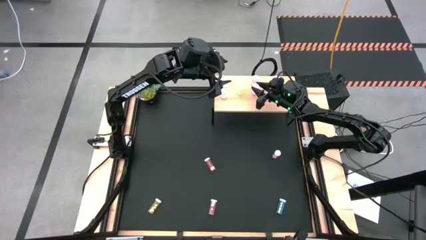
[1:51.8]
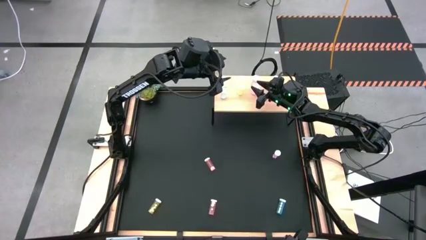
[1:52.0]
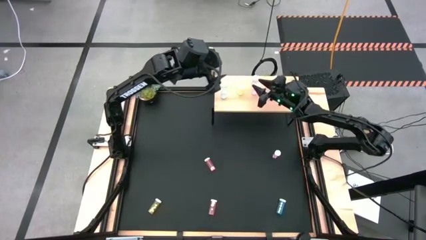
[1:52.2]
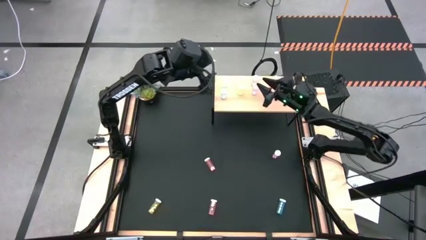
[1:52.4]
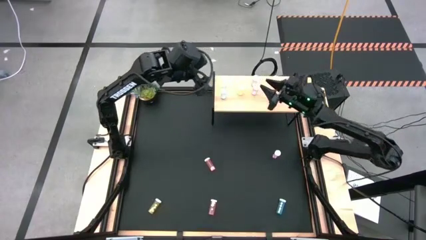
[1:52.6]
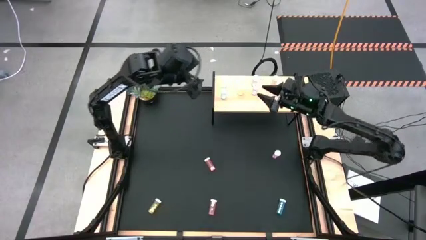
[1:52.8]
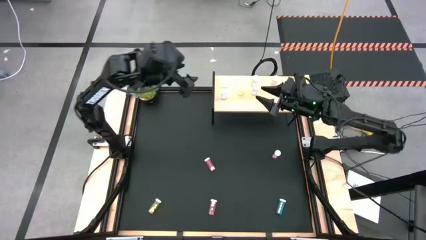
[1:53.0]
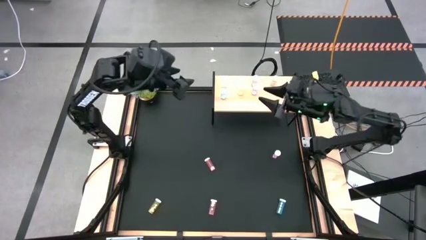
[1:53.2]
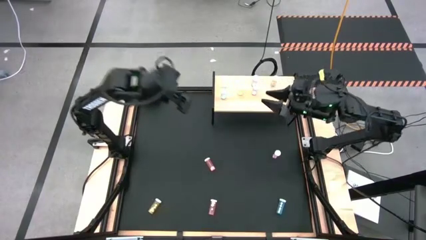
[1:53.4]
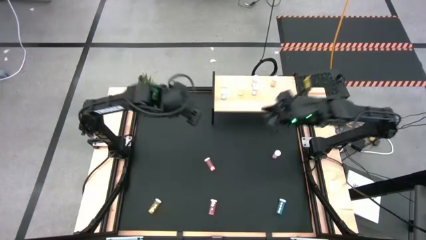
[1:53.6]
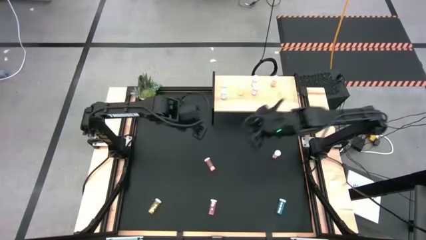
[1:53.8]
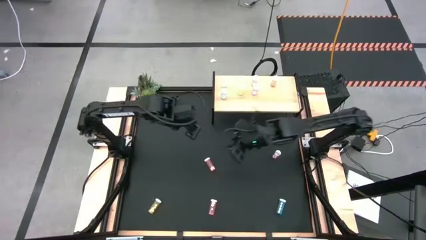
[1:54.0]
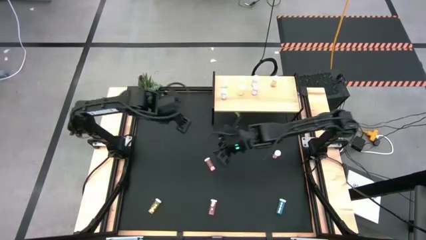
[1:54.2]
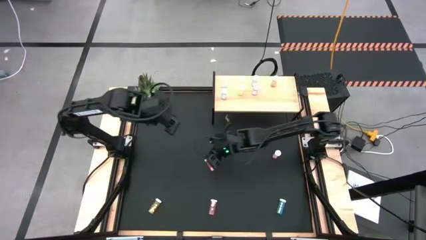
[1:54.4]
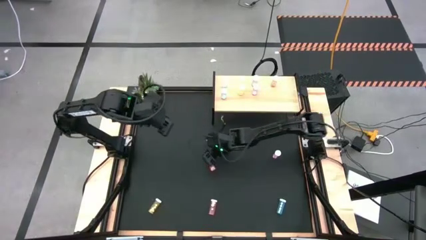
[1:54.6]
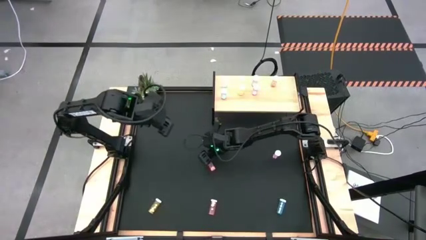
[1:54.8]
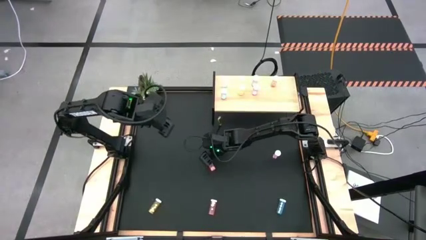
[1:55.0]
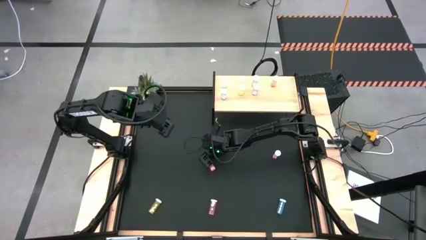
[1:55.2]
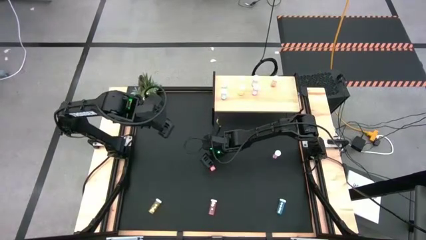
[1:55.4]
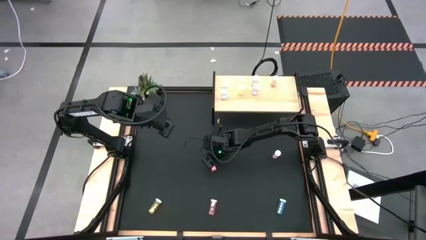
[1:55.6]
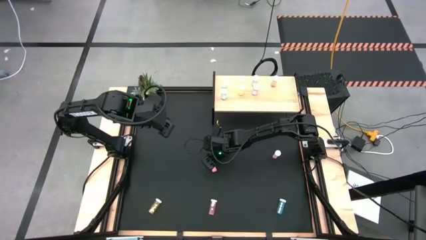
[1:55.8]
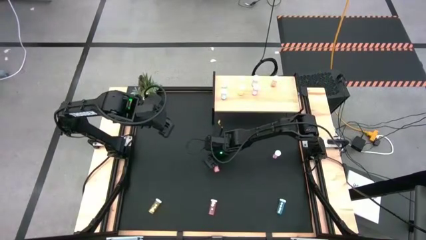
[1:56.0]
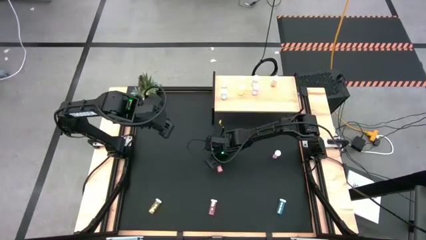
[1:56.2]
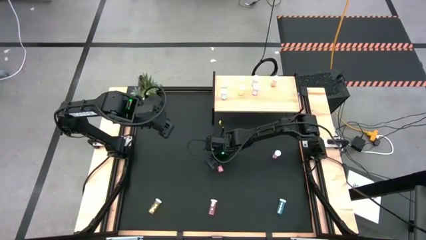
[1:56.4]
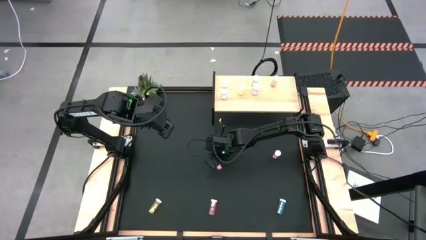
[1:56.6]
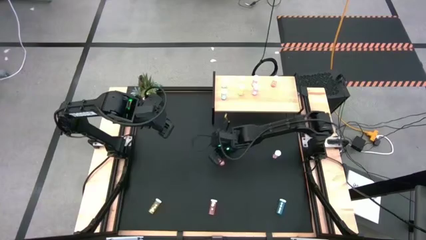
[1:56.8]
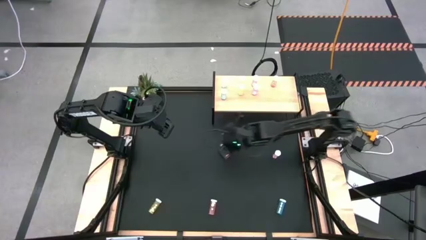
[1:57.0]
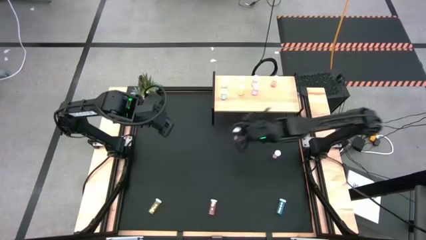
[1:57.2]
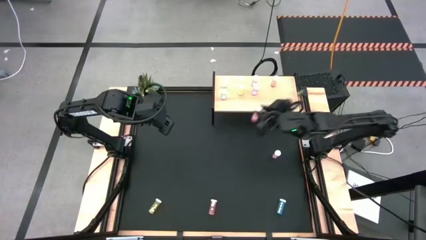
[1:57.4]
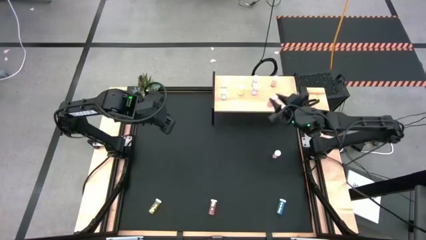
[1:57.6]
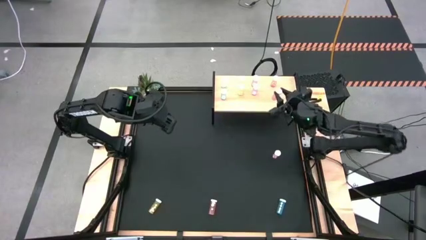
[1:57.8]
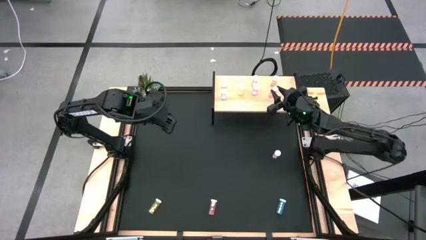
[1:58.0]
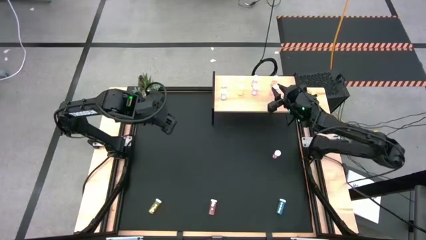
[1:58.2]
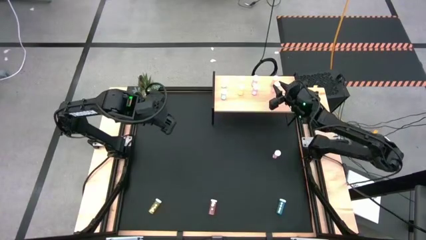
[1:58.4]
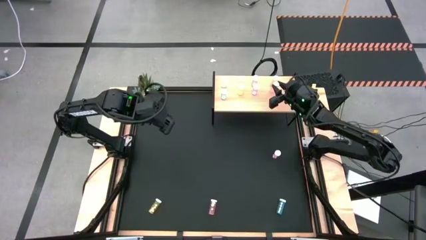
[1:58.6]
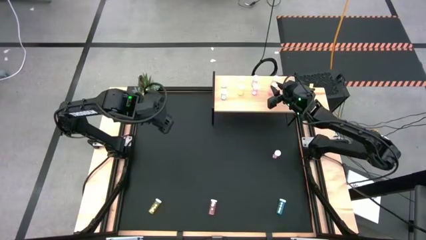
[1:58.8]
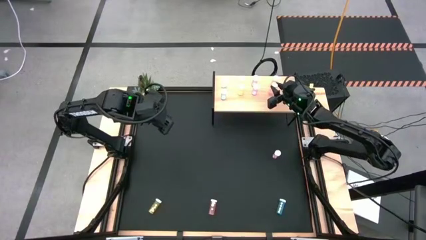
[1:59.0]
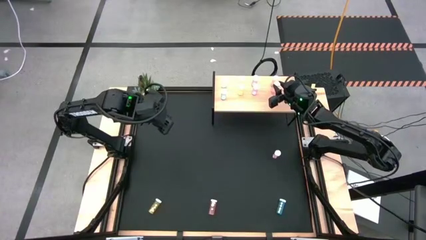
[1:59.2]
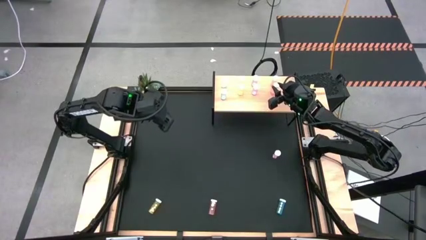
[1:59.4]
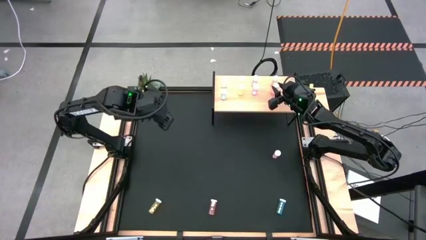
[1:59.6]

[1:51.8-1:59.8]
Task: Pick and place medicine bottles onto shelf by color
Put the top orange pill bottle on the shelf aligned with the other orange pill bottle

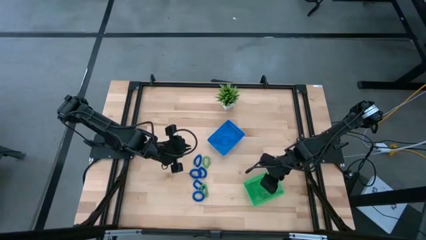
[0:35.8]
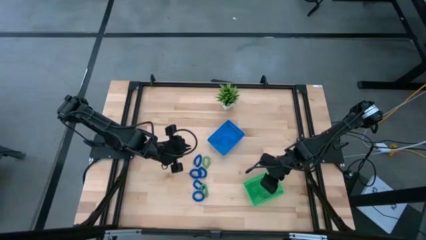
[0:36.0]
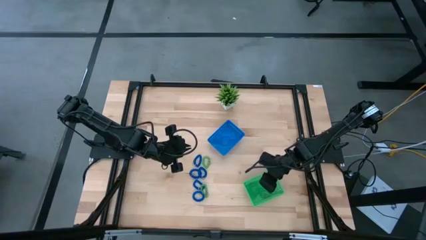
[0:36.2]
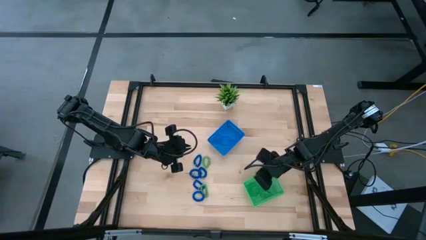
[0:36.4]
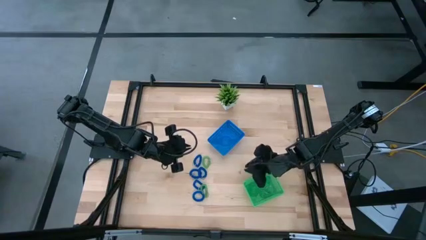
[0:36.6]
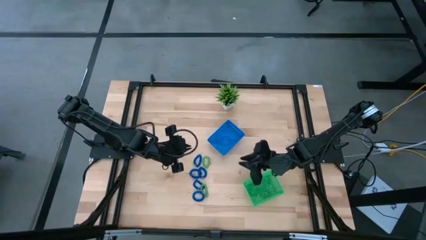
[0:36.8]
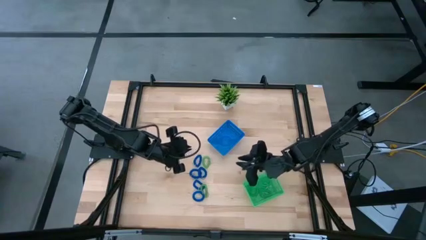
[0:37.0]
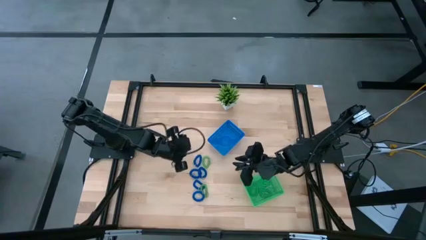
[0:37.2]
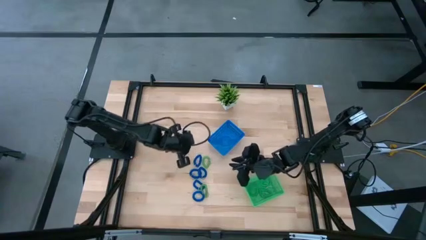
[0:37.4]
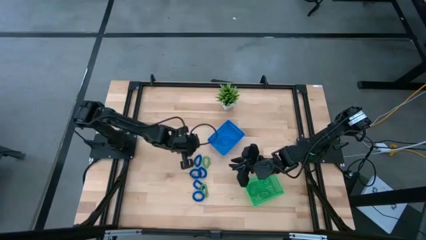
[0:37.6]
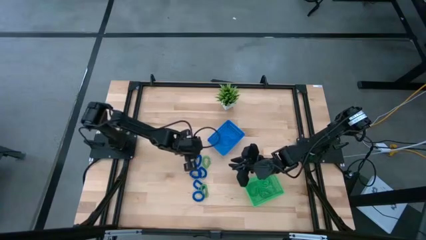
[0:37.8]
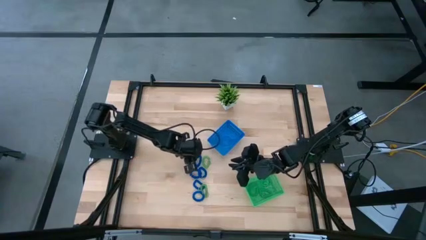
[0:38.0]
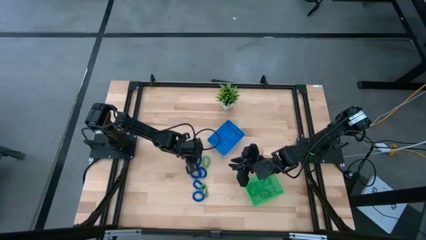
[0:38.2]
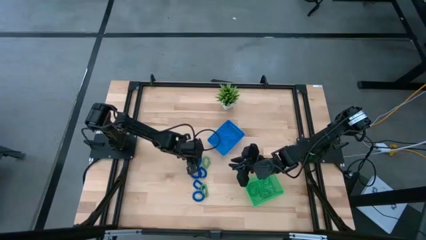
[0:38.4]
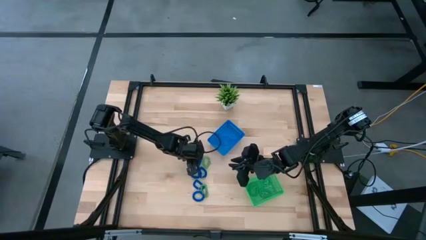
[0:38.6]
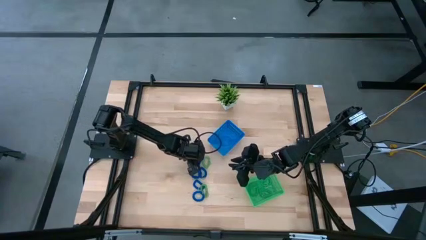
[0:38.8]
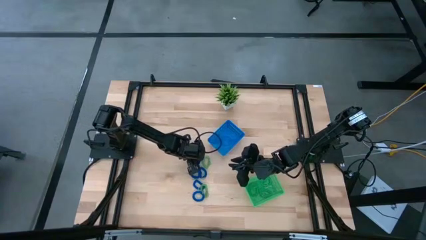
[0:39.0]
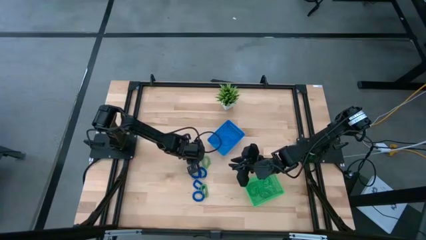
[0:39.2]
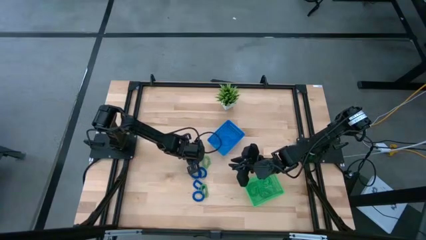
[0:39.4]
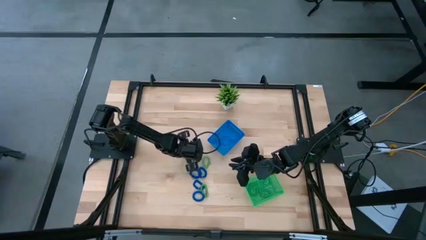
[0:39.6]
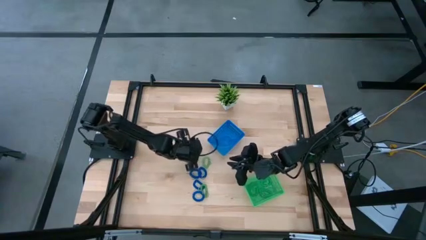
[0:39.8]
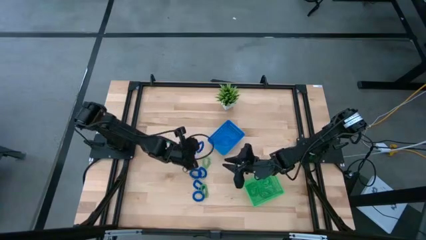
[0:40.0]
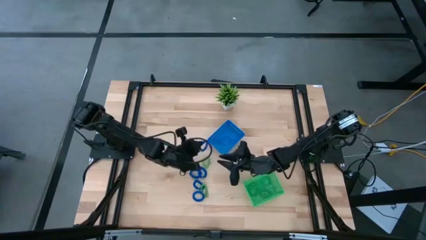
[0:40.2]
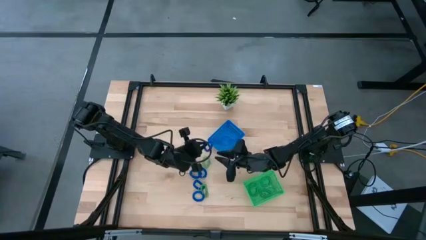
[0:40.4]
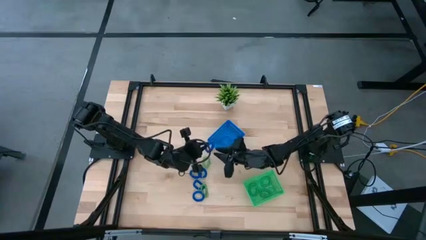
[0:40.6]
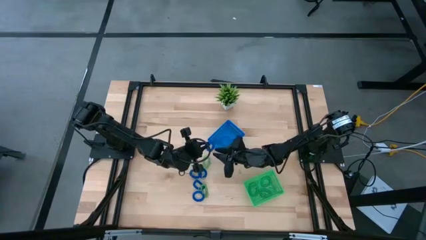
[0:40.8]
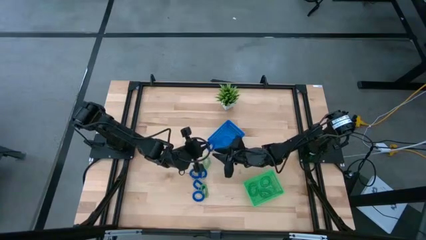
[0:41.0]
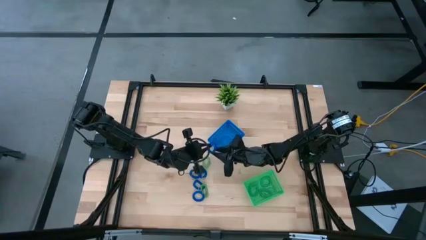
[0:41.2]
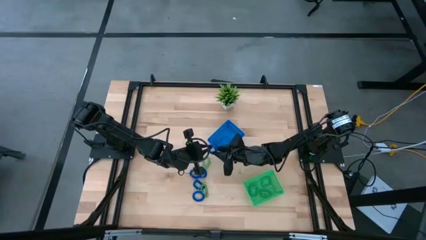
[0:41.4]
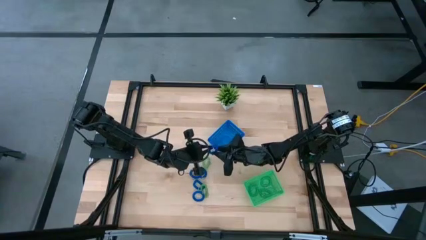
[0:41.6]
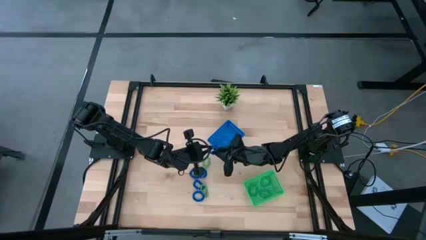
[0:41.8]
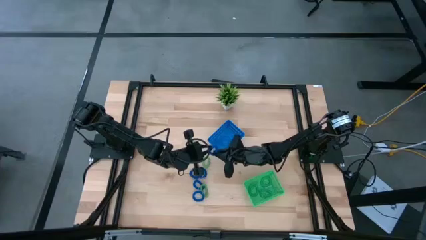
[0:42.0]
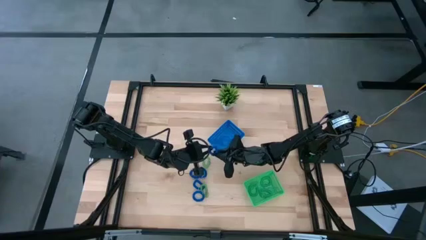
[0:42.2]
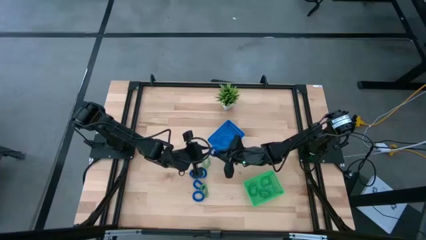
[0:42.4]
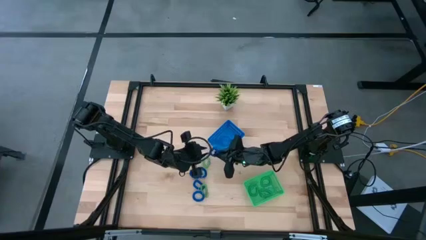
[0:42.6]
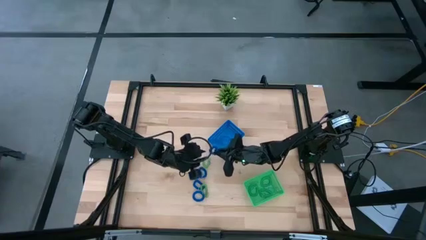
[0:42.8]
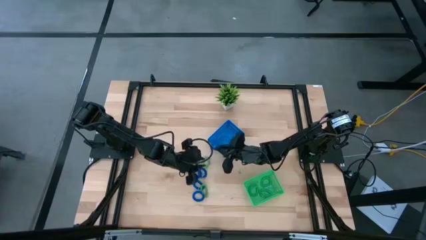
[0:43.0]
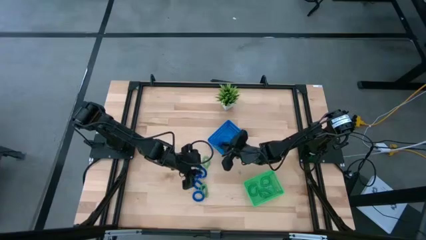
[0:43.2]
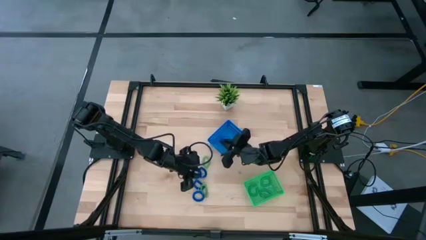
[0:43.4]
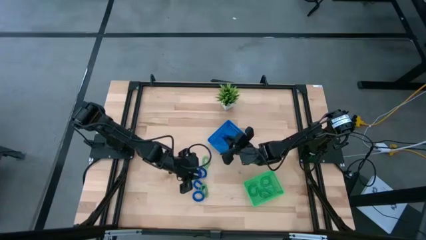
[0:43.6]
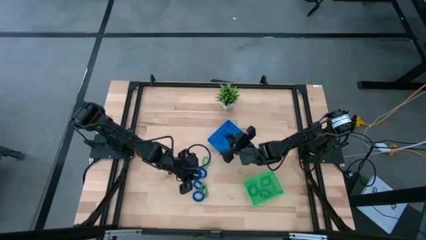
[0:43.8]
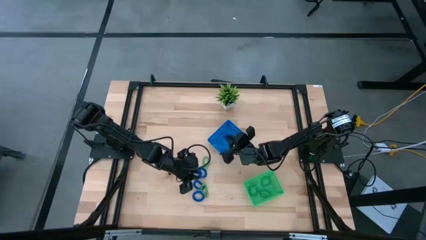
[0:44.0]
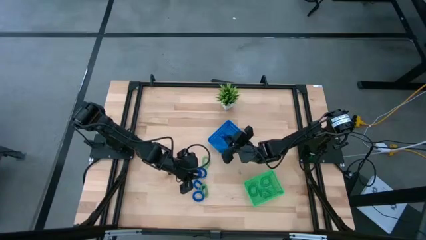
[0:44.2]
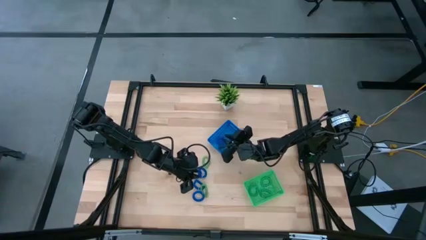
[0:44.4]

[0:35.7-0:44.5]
Task: Sort spring keychains
Put the blue spring keychain into the blue bin
